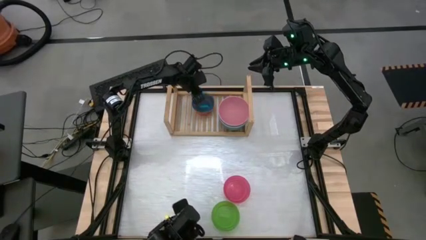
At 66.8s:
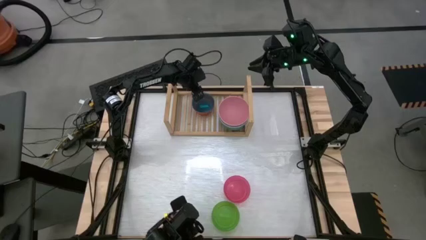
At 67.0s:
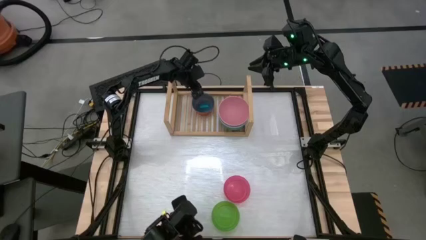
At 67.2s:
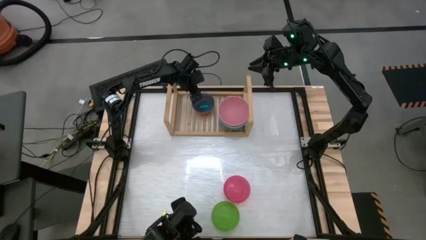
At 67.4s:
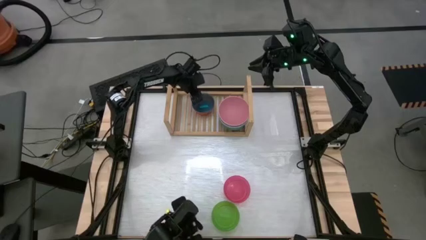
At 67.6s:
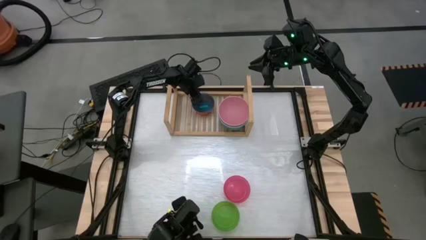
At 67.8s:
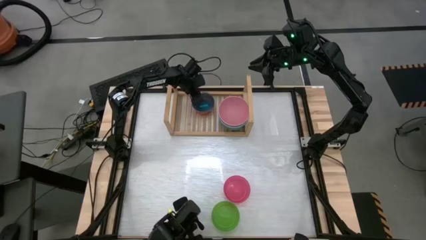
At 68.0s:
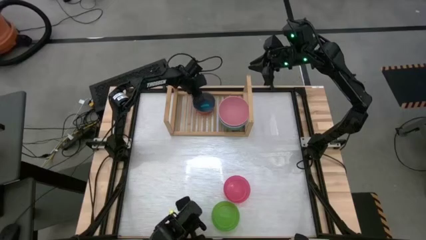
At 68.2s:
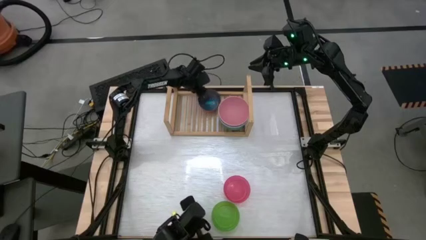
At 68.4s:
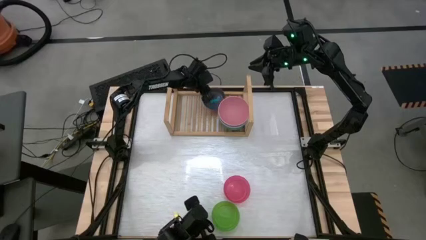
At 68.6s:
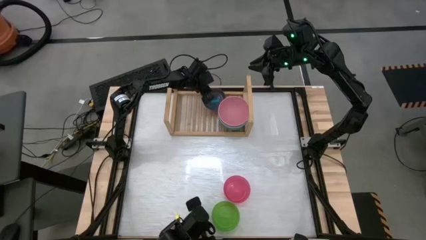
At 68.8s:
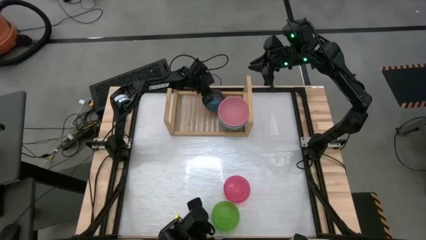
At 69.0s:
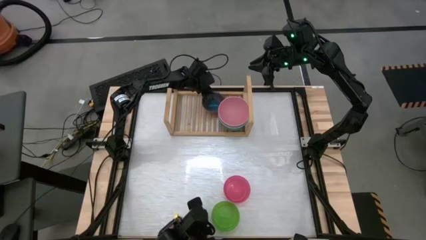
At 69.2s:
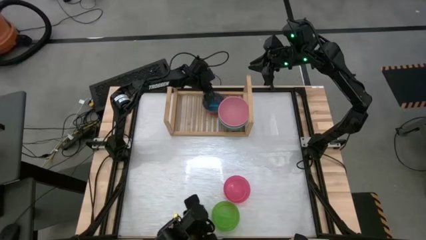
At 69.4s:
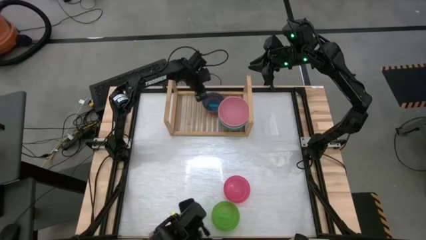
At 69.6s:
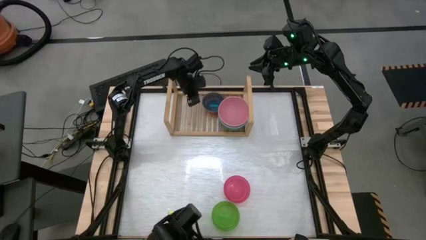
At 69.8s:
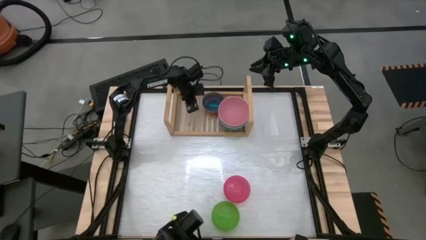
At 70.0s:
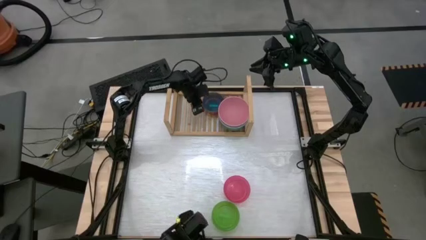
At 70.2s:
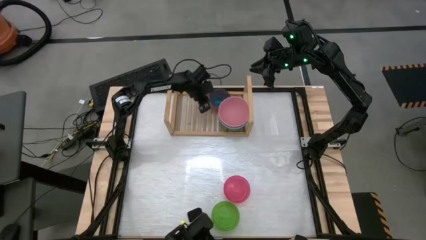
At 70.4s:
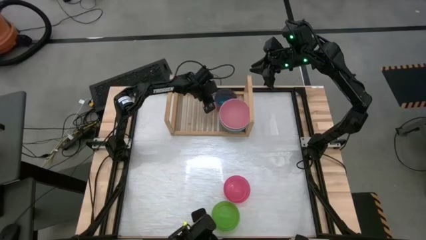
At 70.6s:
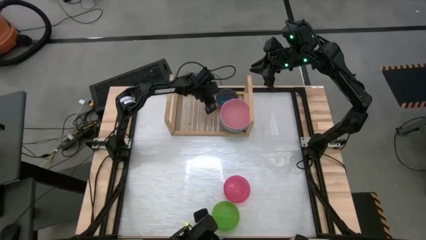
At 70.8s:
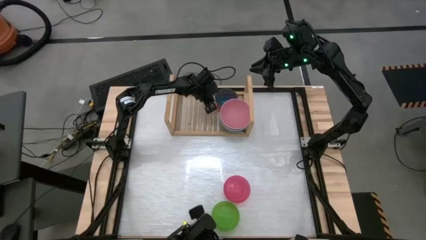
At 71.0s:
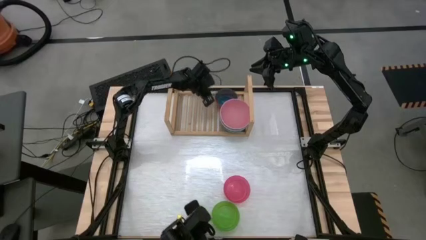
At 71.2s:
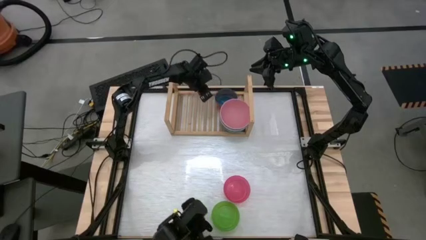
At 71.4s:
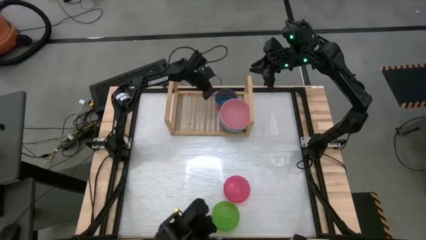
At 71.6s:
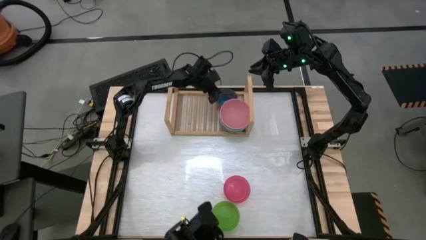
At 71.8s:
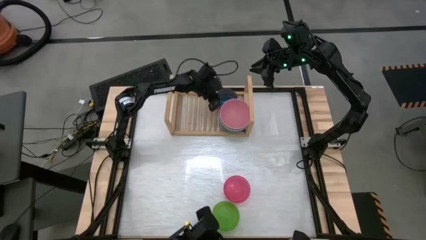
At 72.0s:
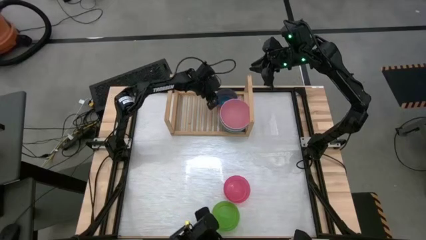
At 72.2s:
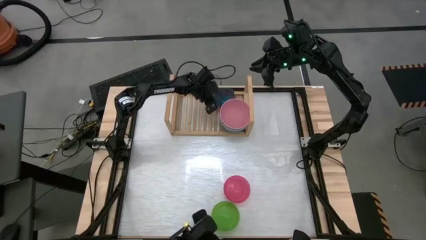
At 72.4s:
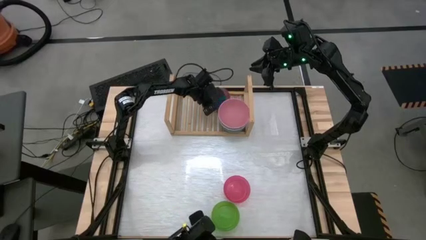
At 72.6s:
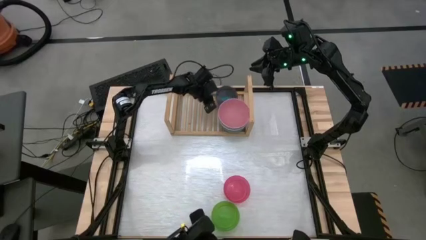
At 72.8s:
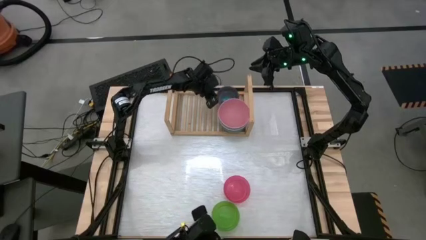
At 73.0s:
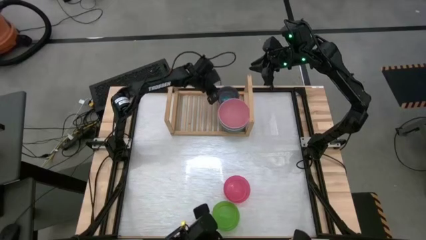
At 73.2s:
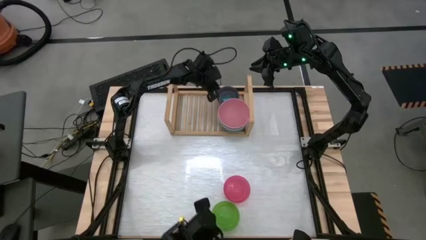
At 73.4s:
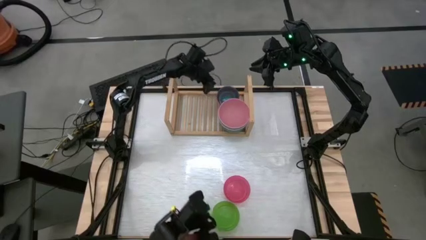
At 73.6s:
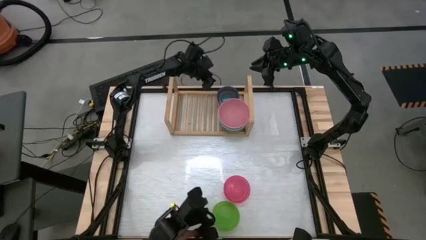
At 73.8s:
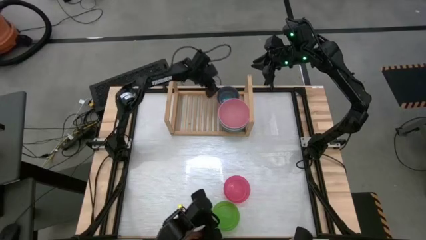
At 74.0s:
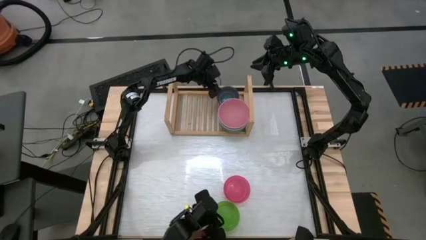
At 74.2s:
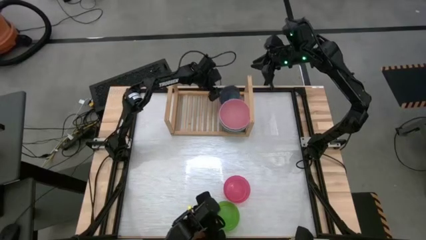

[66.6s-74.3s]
Task: Place and stack bowls onto a shelf
Adjust the left stacked bowls on the shelf

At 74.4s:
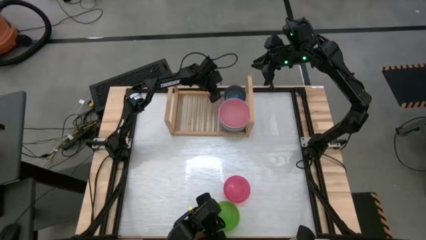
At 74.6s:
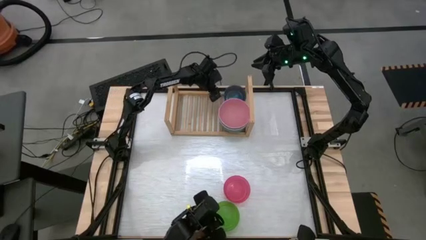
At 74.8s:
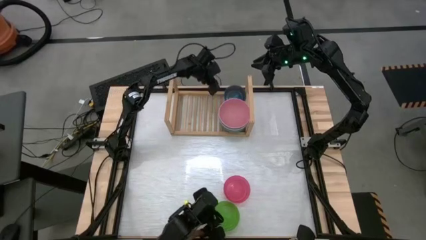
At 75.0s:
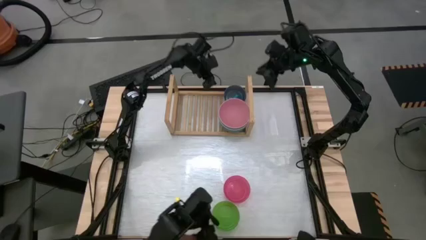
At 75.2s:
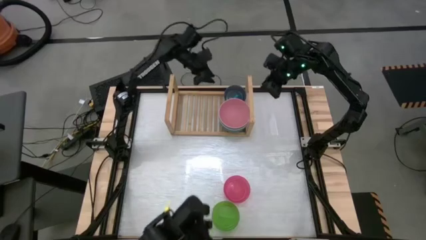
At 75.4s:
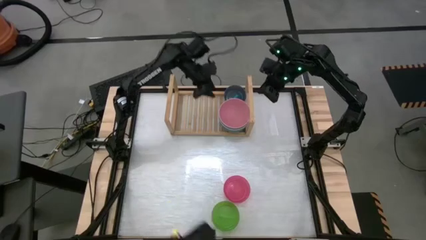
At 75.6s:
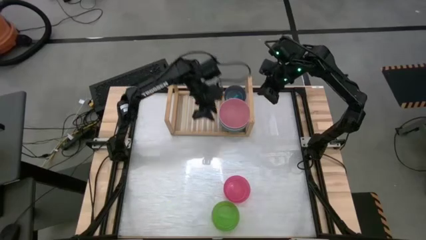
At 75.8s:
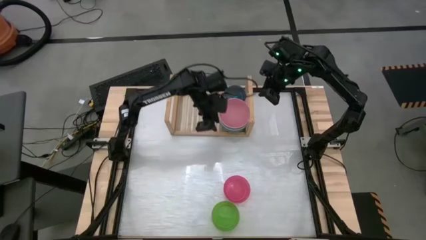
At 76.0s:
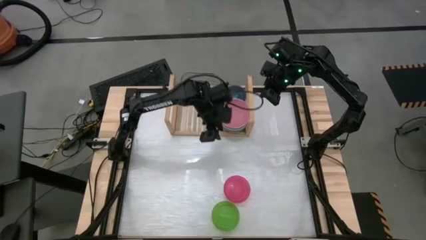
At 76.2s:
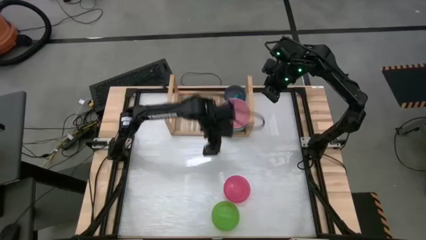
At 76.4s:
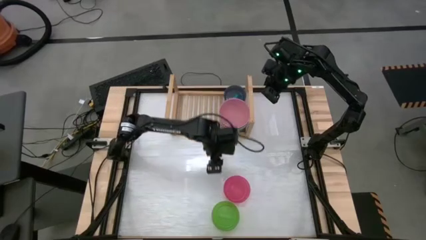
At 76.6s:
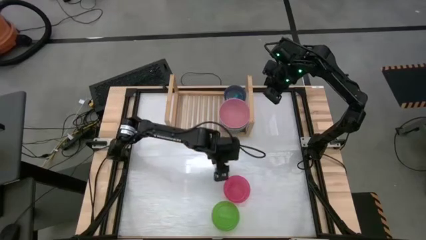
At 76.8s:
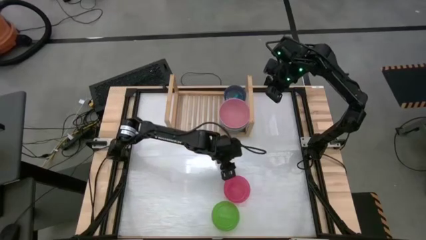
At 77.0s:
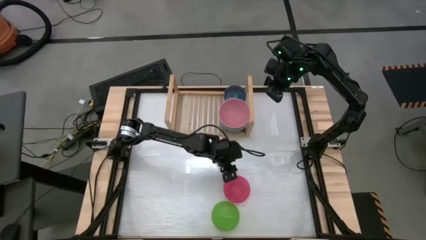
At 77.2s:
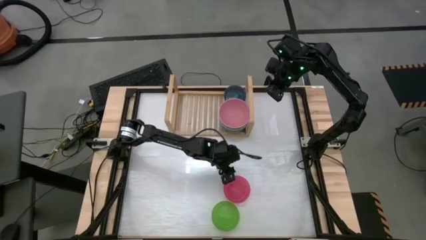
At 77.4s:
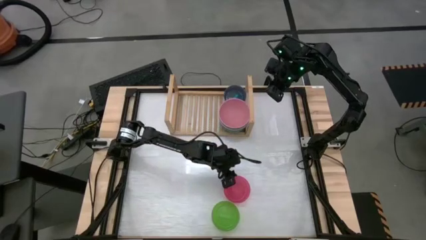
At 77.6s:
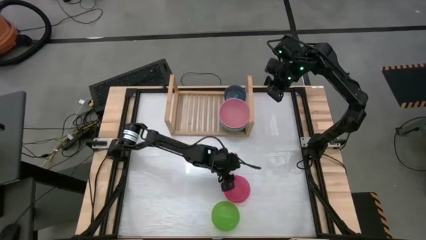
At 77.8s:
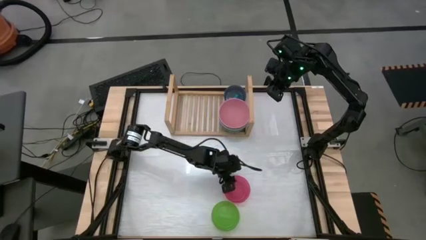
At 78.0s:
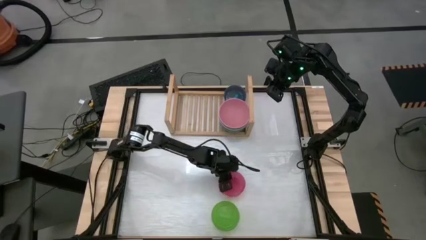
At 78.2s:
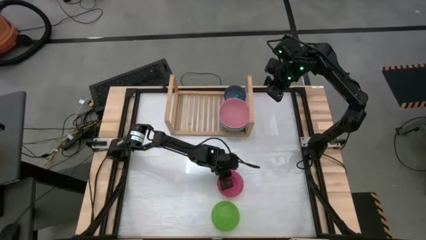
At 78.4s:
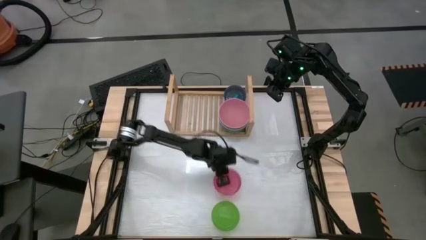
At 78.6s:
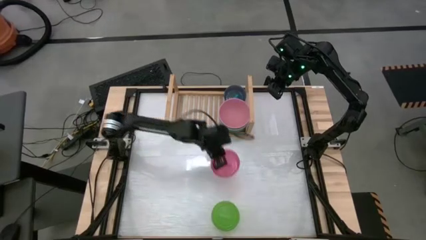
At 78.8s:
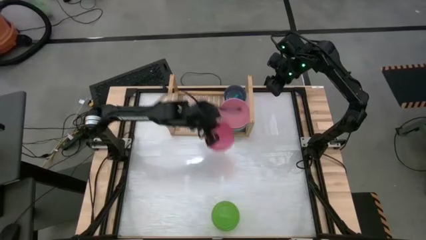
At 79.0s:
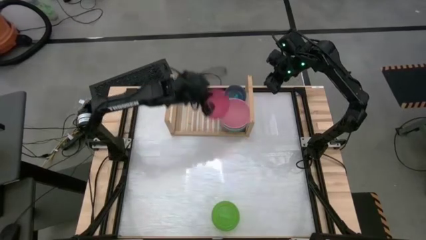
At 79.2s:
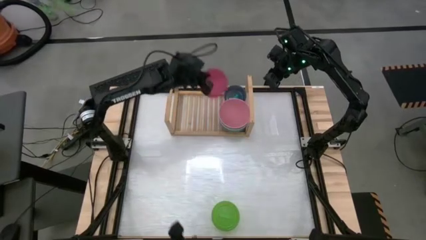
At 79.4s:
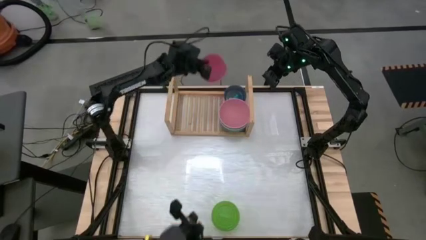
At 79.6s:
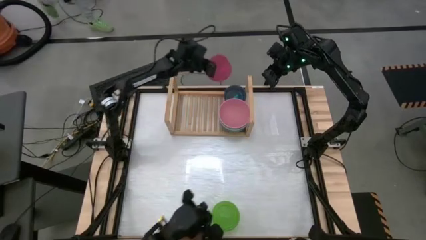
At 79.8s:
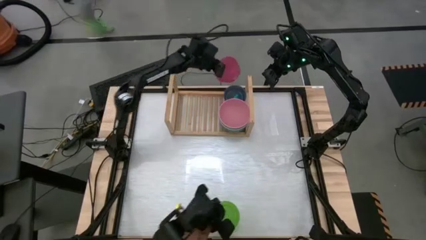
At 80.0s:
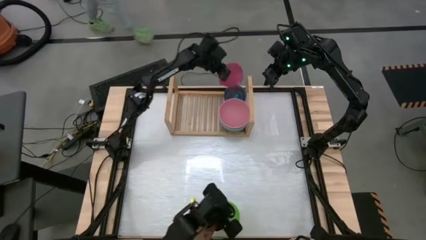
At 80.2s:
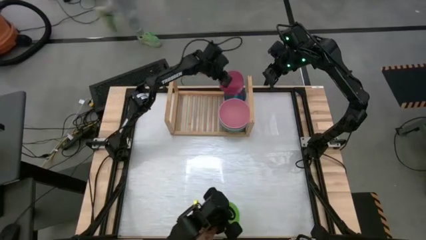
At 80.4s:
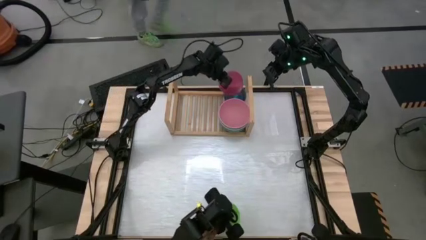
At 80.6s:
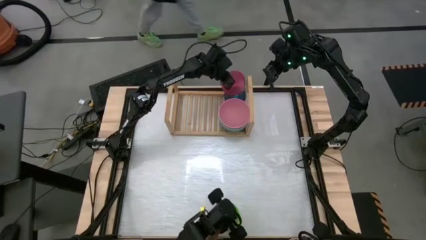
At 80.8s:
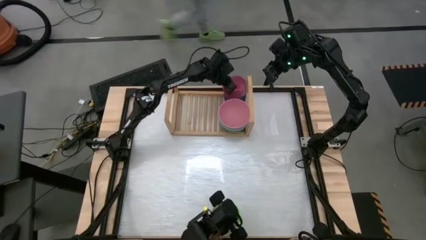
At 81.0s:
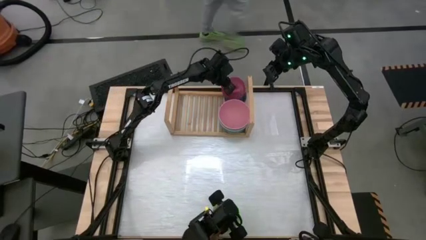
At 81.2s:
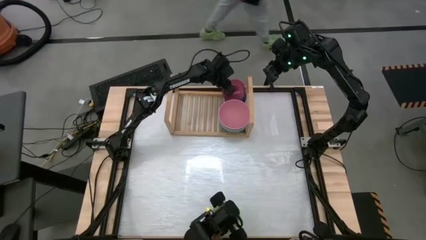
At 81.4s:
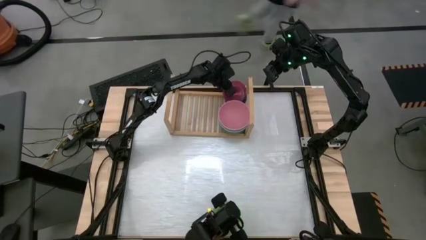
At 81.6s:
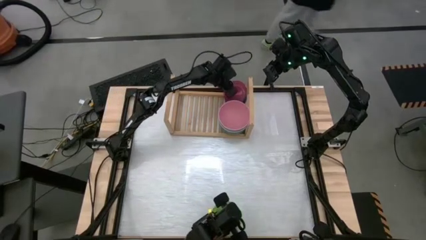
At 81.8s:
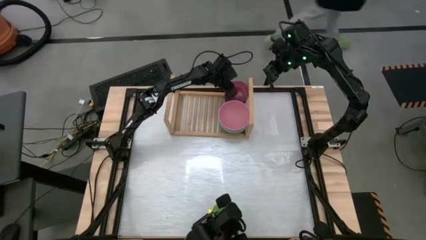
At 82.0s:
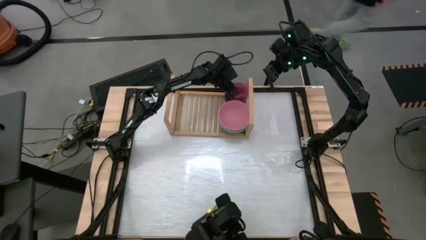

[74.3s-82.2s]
Stack the light pink bowl on top of the light blue bowl on the shelf

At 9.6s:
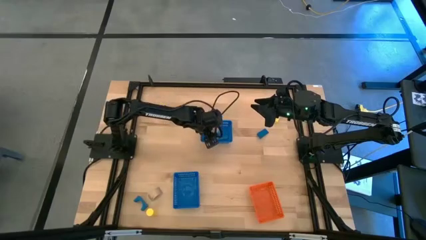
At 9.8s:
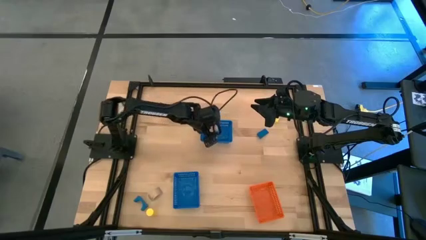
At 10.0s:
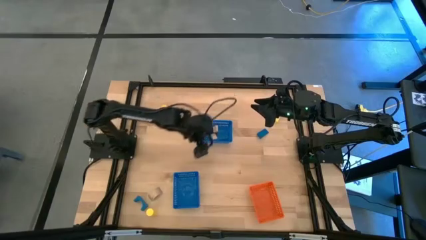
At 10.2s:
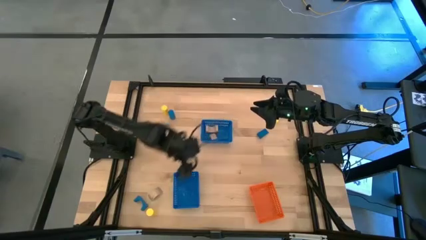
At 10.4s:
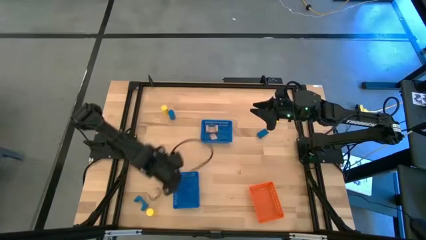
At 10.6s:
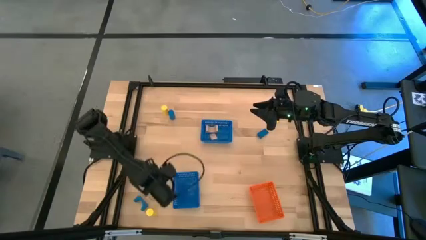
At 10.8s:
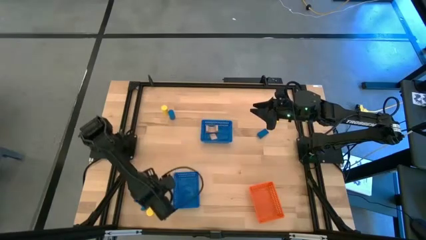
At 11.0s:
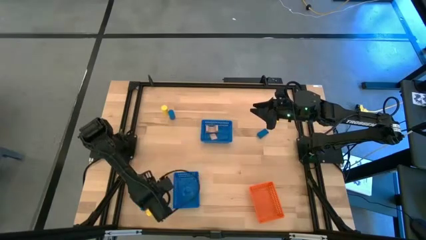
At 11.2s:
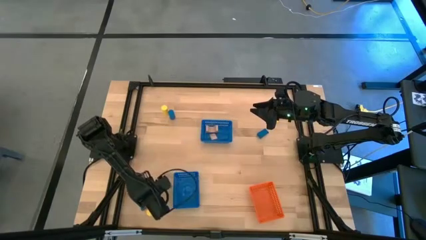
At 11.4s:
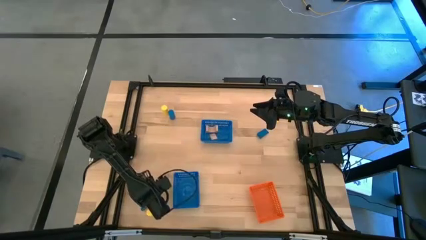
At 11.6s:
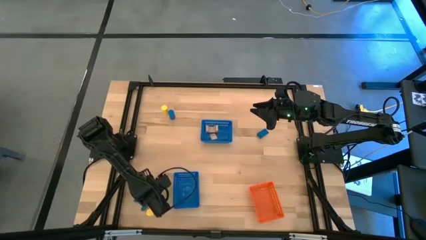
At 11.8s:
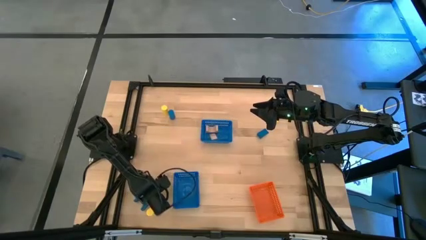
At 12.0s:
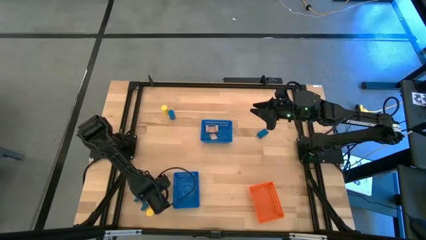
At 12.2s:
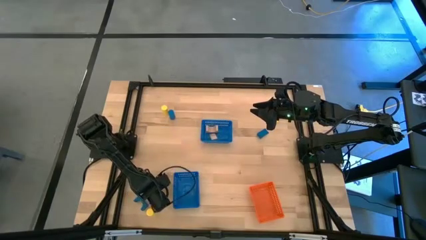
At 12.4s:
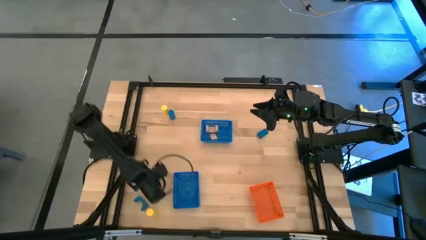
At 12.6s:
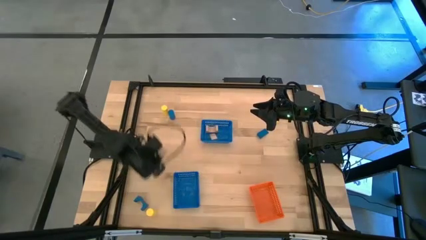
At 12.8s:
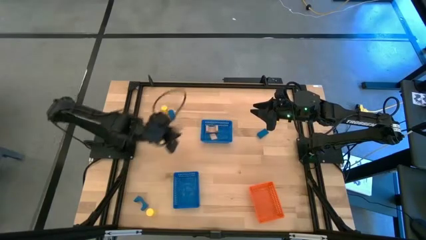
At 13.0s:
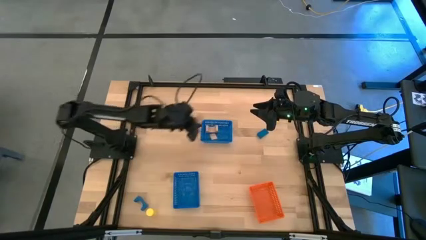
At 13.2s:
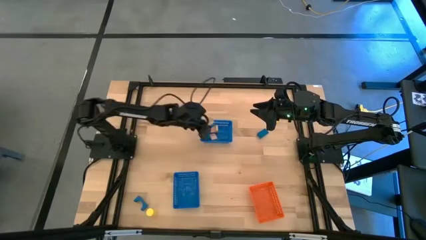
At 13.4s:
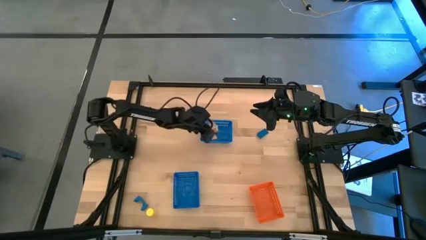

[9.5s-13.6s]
Task: Sort & place blocks by color
Put the bottom brown block into the top blue basket
